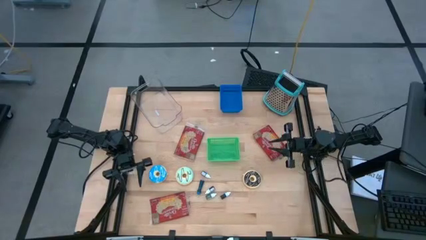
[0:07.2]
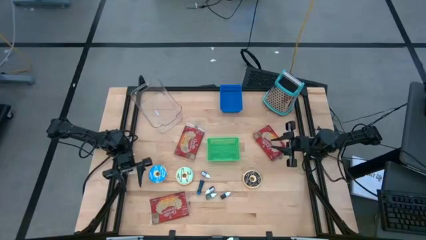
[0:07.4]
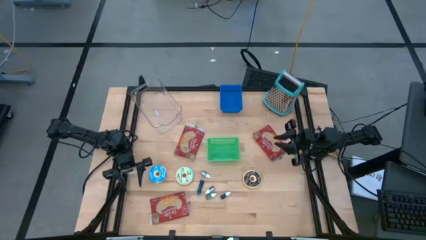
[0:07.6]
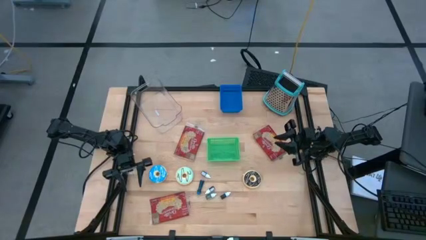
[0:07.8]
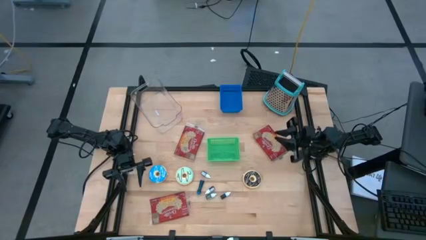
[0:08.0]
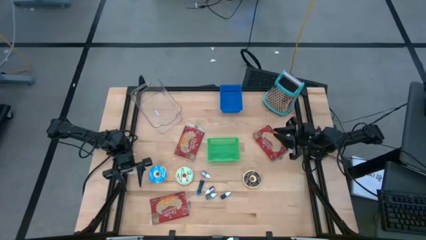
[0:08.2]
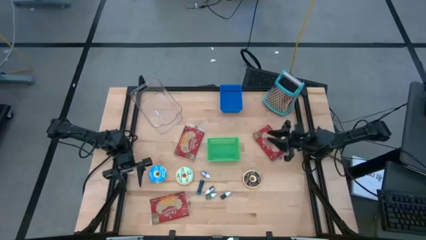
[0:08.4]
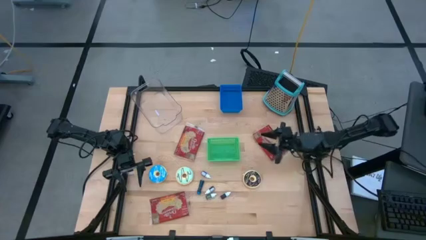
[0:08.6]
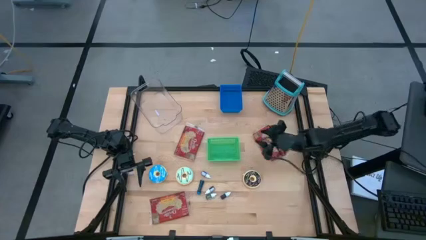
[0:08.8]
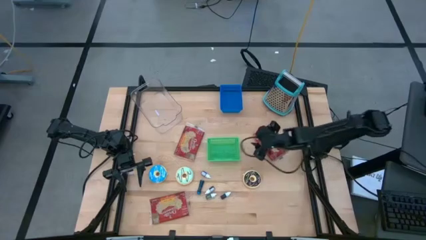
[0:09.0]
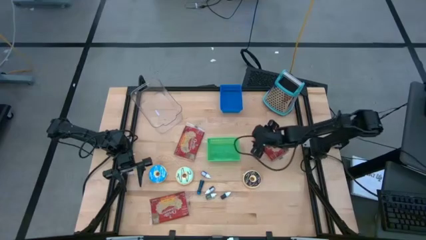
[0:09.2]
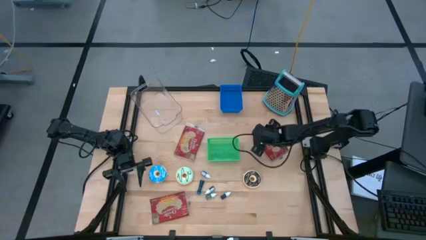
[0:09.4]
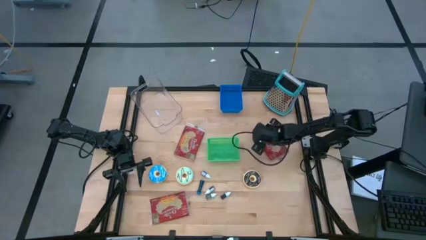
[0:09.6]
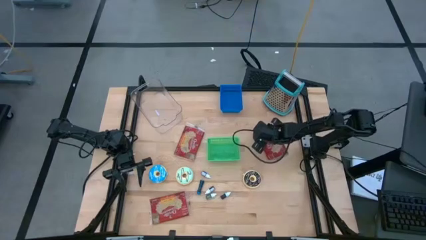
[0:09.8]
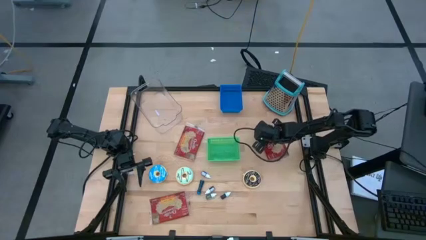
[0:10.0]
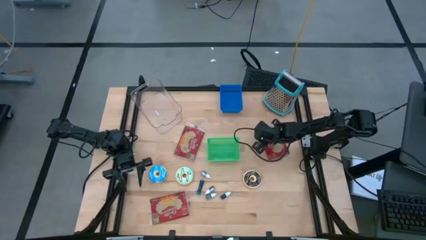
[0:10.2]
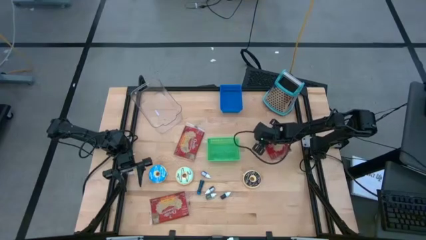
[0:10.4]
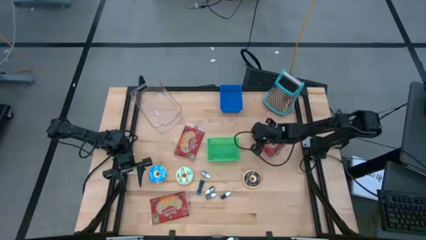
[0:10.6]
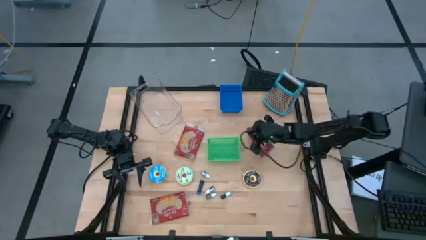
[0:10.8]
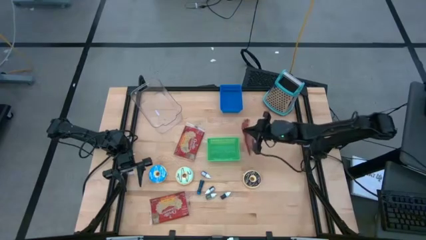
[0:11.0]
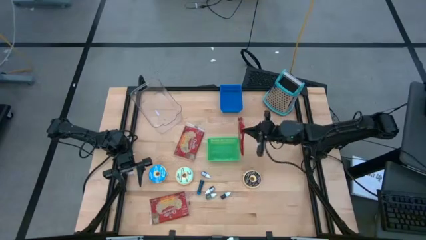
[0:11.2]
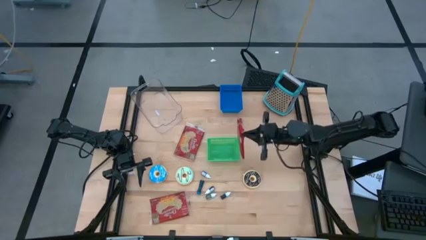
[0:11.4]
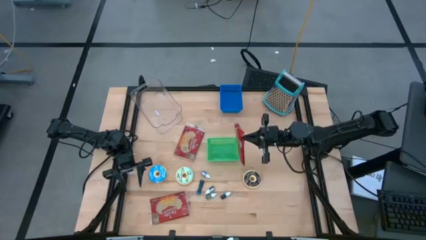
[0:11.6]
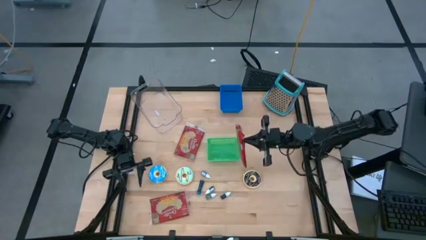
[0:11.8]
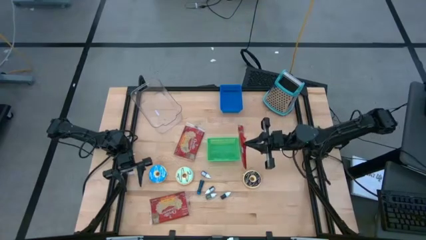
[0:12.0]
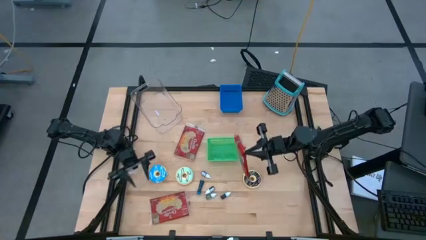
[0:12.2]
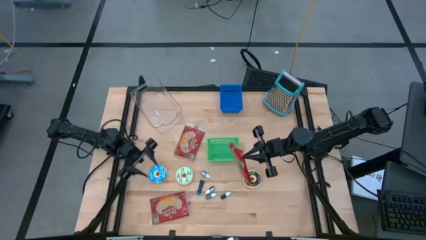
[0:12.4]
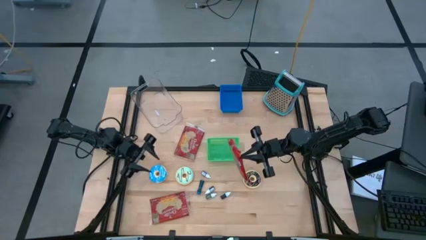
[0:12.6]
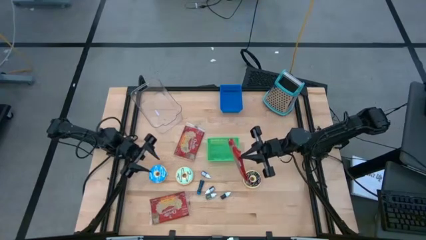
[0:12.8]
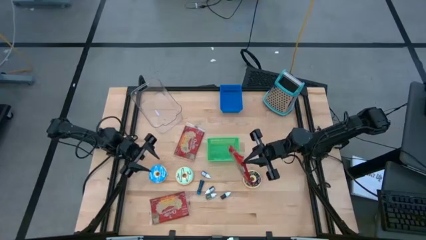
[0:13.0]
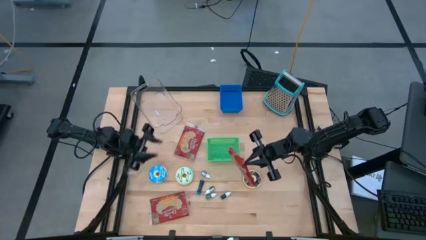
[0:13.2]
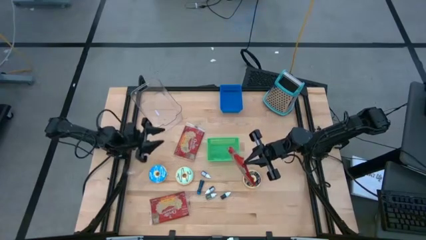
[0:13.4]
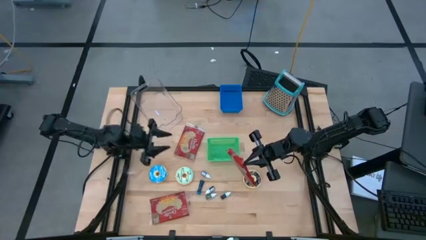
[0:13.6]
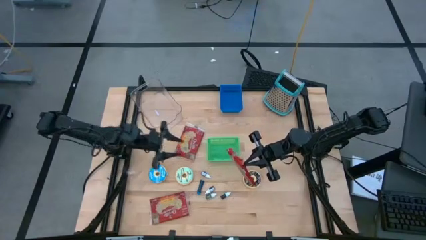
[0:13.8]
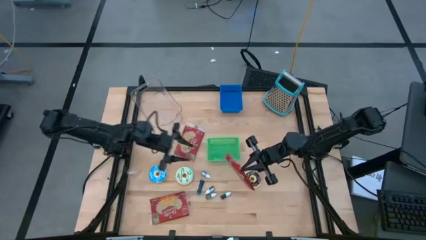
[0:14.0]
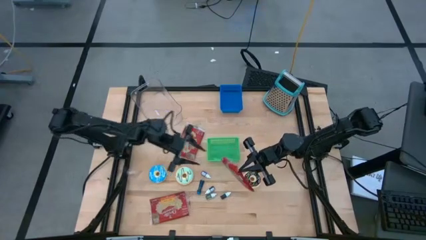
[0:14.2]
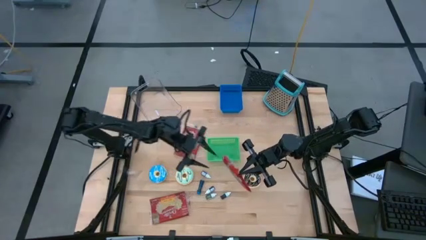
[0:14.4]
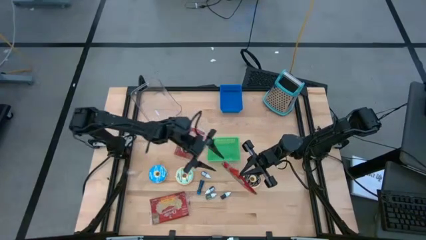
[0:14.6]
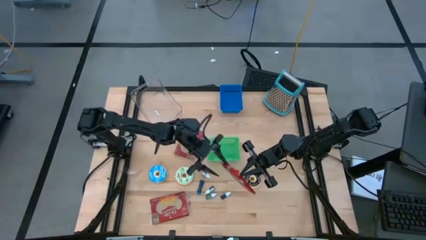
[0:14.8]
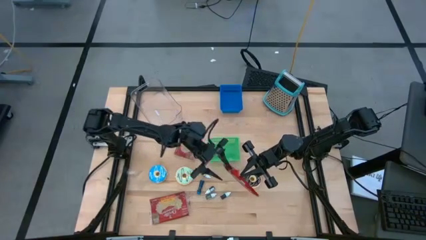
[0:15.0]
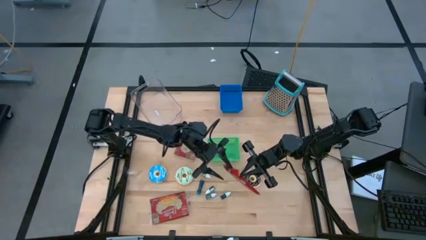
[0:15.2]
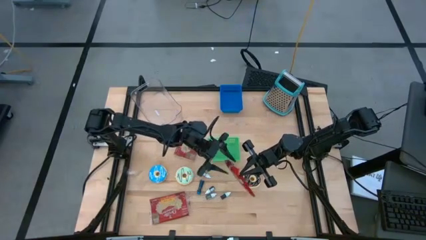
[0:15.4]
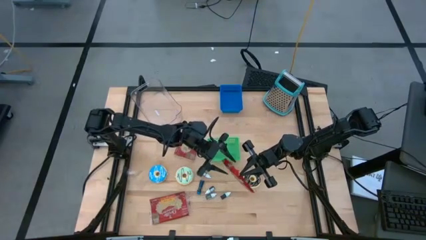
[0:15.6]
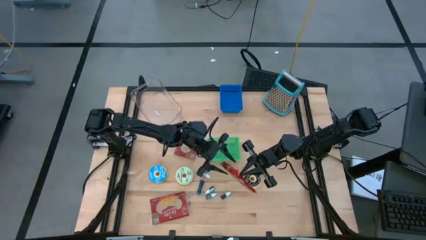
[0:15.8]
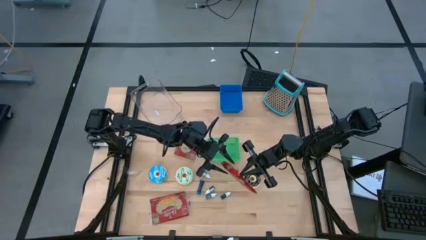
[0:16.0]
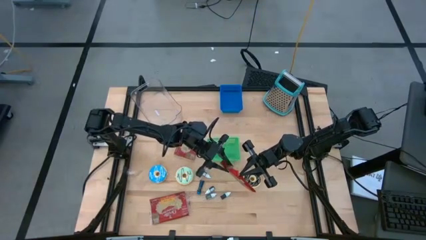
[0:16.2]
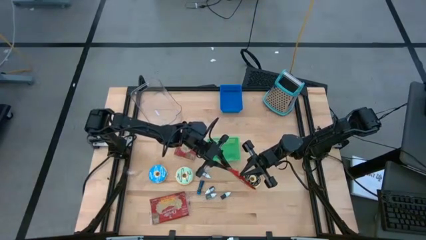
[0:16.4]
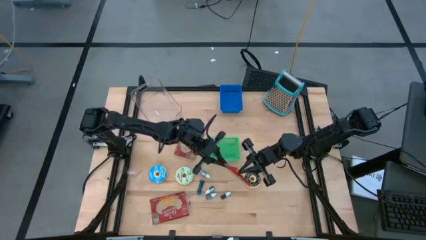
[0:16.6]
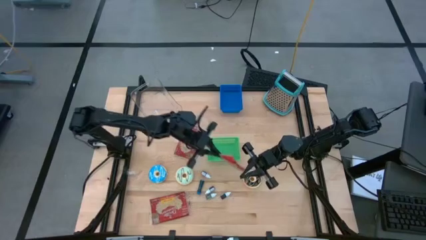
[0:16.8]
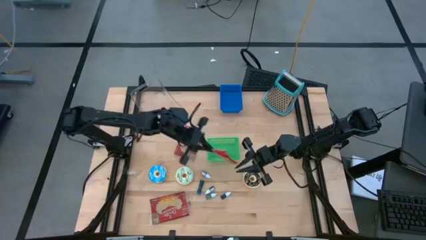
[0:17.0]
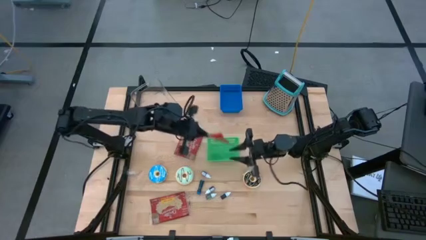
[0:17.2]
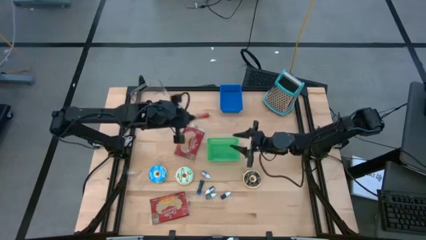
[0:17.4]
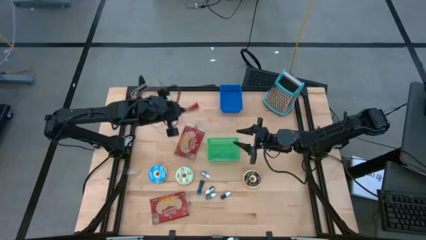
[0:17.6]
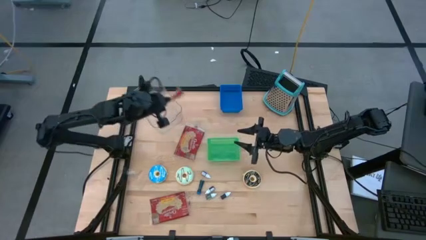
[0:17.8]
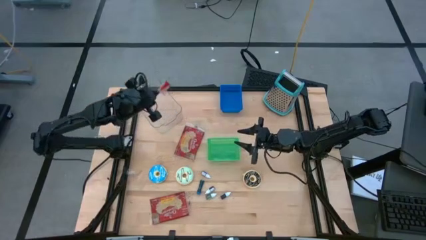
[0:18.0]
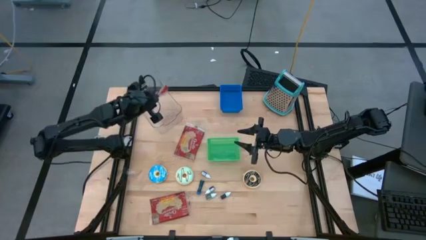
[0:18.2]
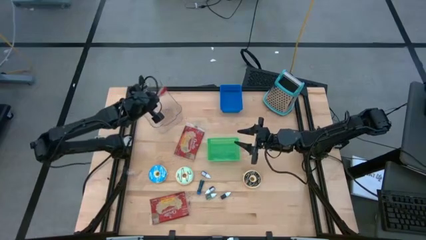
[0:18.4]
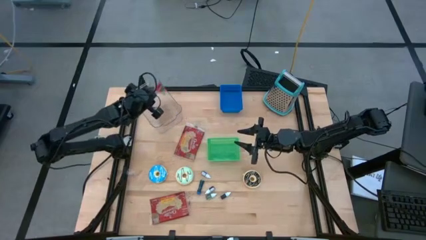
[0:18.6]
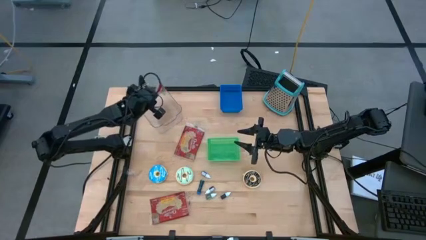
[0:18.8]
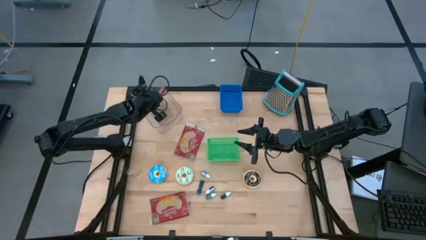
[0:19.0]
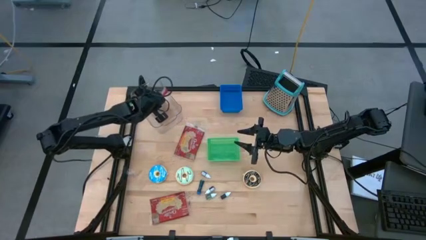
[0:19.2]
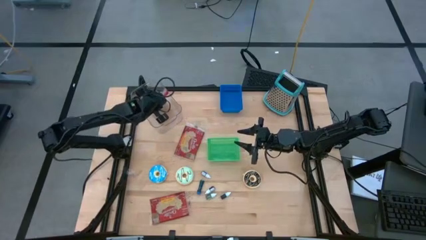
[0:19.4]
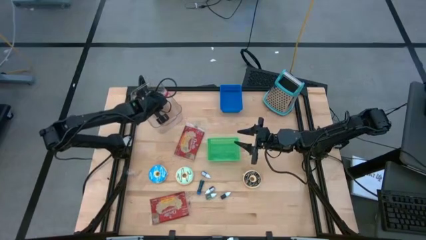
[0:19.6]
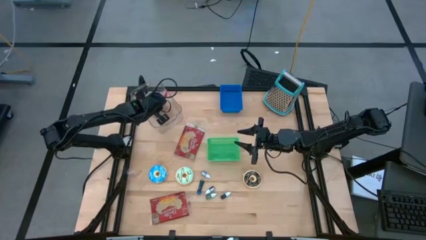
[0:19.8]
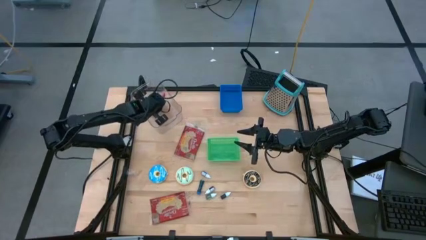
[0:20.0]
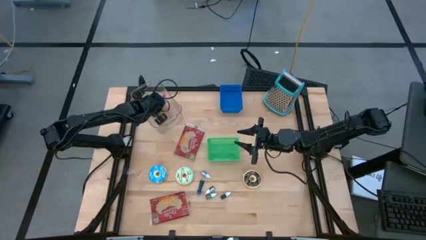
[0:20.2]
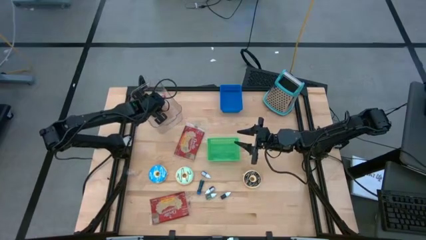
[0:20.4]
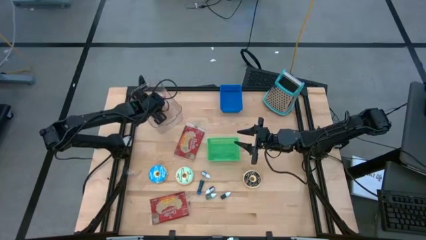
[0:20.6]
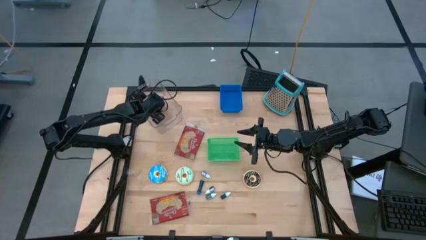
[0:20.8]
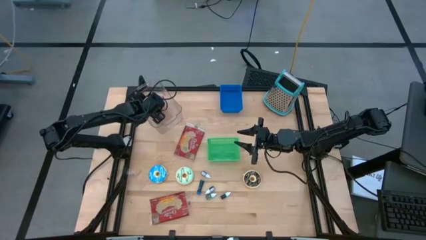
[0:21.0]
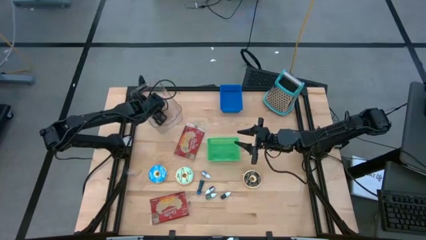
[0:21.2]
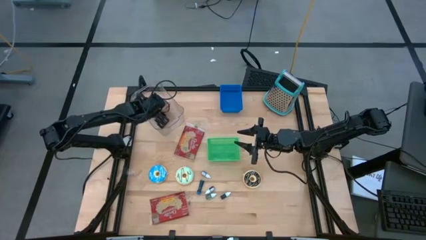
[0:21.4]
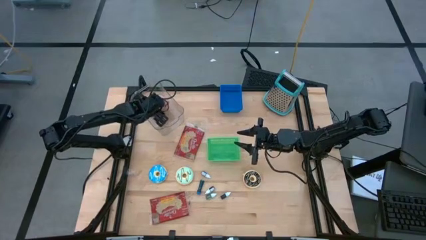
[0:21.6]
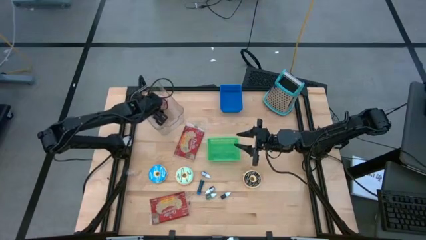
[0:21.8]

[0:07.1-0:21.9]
Put the top right red popcorn bag into the transparent bin

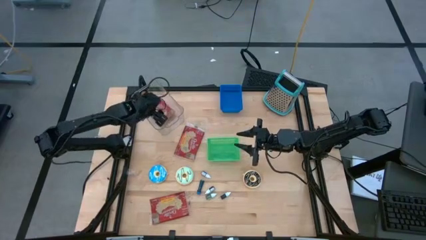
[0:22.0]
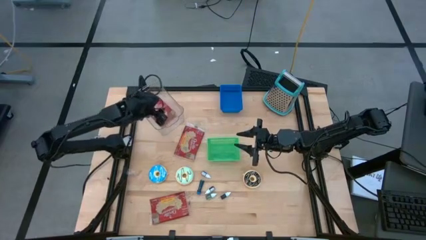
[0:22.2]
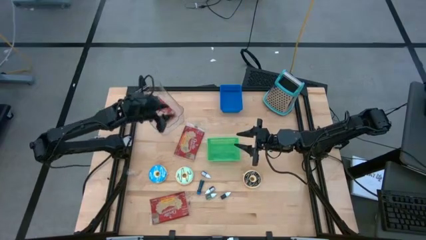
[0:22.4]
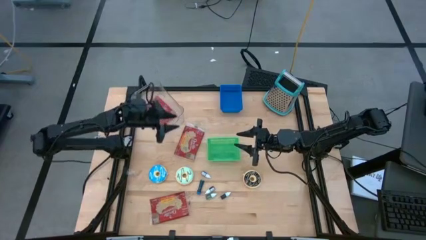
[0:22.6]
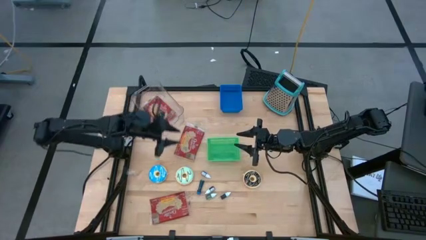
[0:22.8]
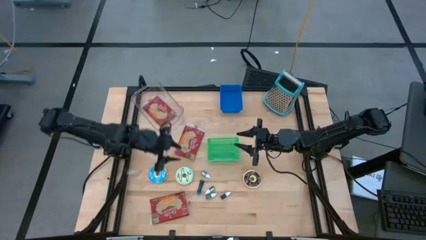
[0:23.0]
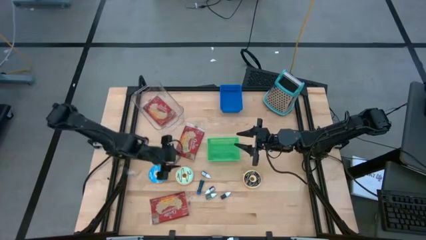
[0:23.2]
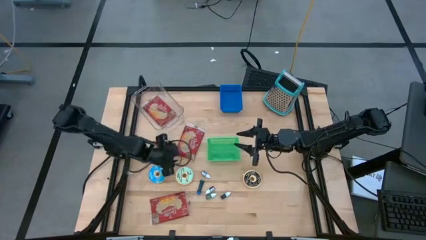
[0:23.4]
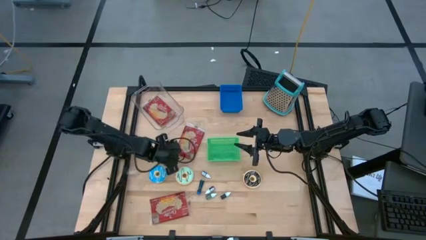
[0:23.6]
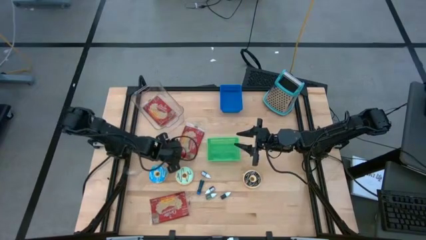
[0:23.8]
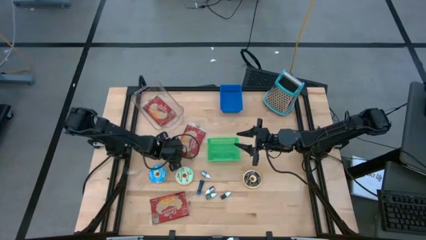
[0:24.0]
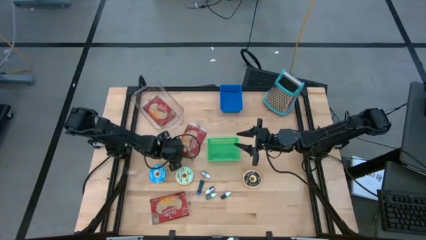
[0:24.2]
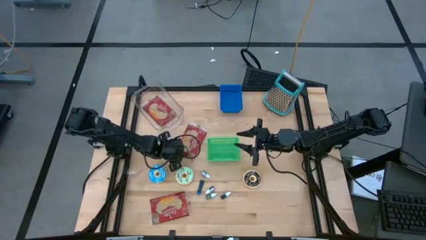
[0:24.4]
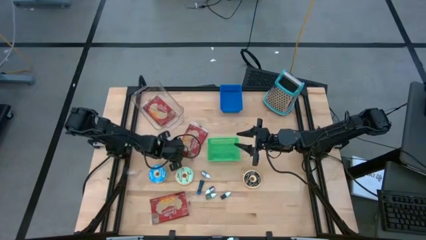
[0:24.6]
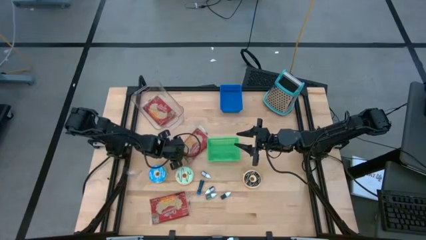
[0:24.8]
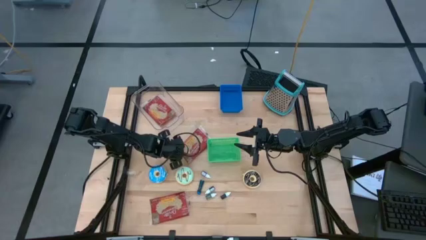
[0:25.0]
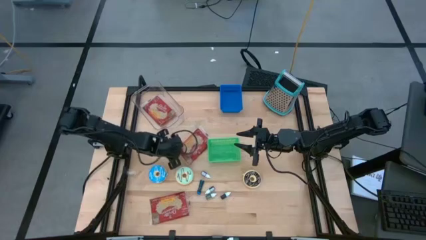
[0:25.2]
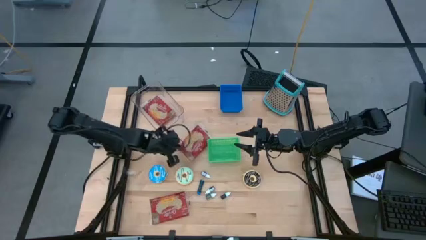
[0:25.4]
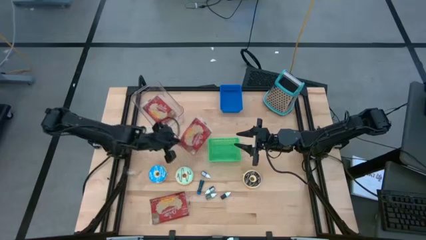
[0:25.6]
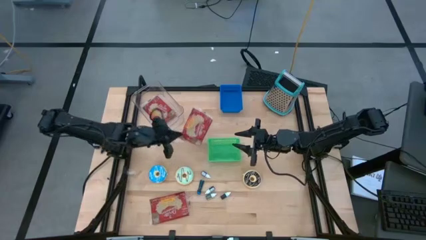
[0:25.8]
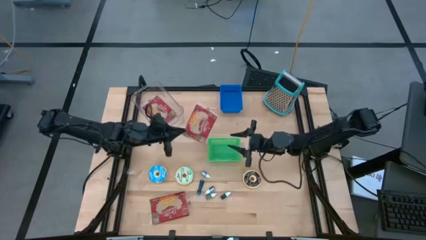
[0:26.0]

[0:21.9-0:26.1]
Put the top red popcorn bag into the transparent bin
